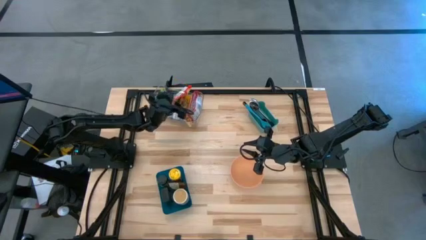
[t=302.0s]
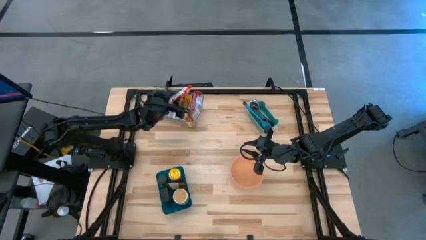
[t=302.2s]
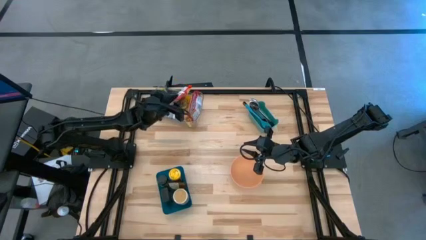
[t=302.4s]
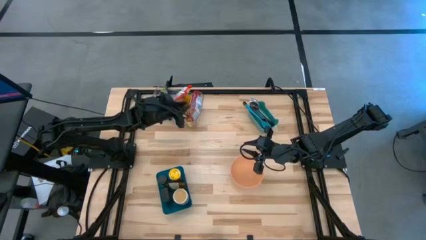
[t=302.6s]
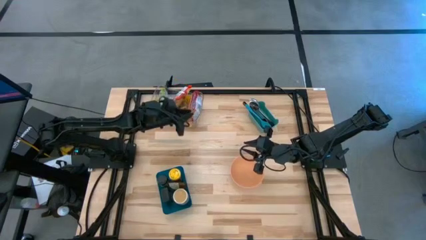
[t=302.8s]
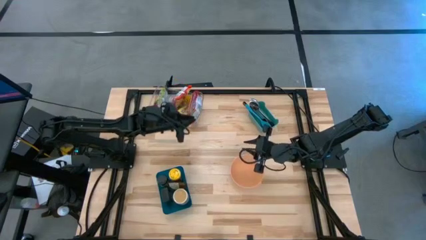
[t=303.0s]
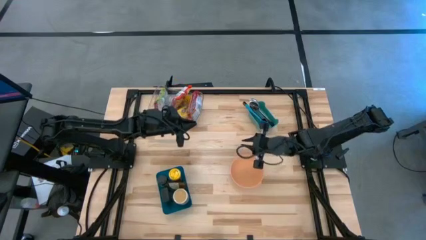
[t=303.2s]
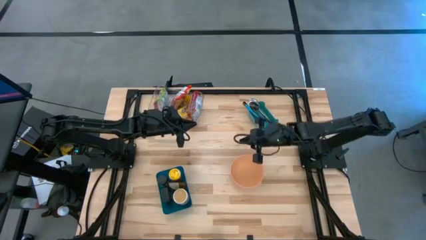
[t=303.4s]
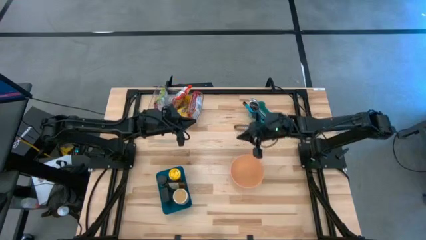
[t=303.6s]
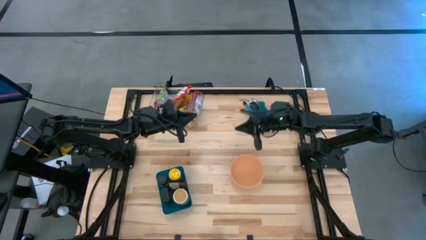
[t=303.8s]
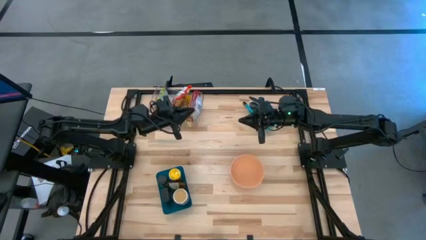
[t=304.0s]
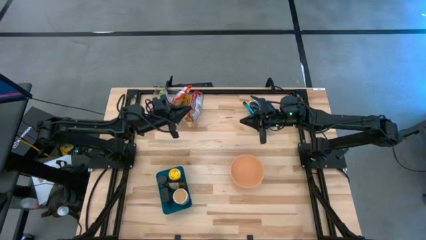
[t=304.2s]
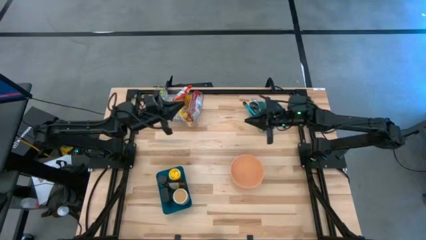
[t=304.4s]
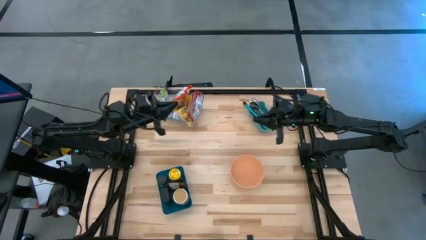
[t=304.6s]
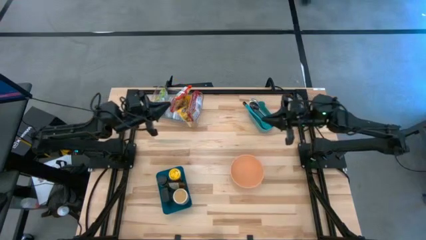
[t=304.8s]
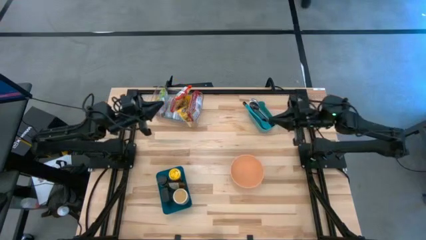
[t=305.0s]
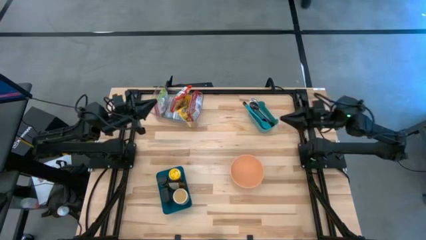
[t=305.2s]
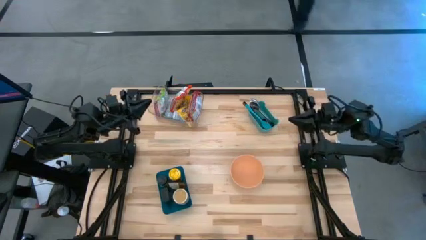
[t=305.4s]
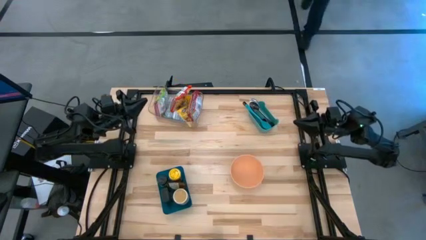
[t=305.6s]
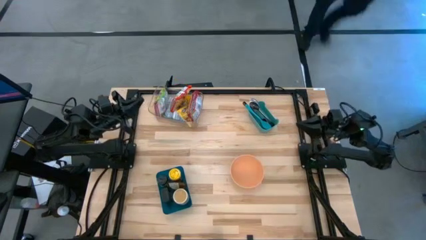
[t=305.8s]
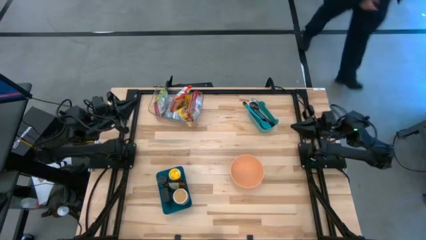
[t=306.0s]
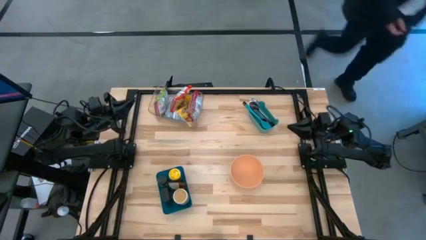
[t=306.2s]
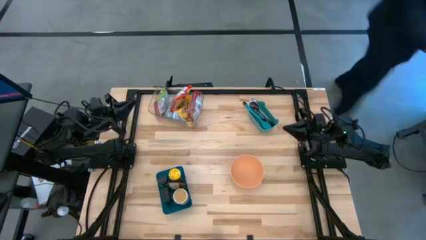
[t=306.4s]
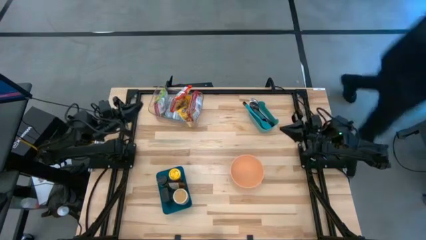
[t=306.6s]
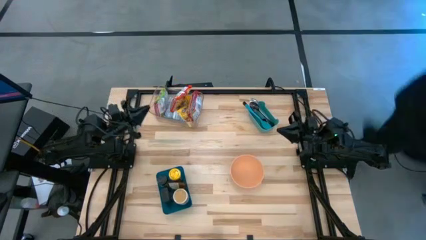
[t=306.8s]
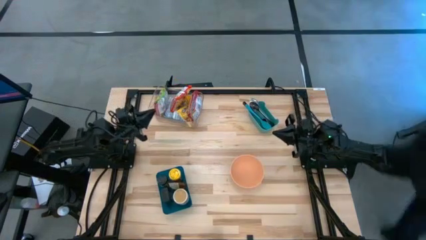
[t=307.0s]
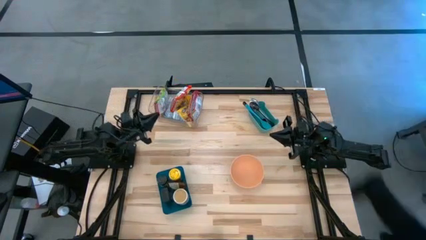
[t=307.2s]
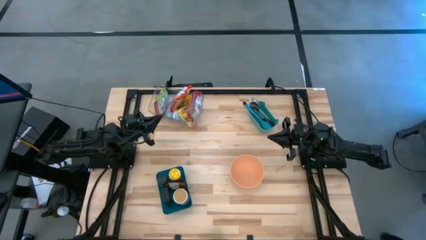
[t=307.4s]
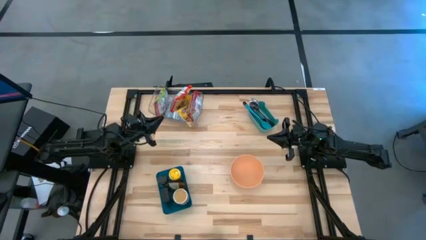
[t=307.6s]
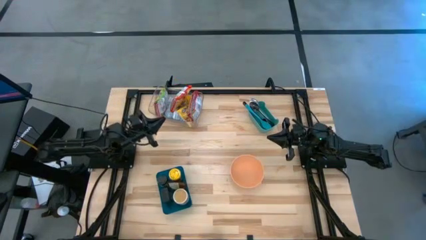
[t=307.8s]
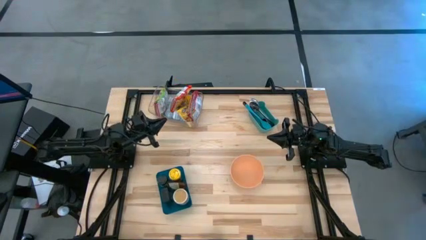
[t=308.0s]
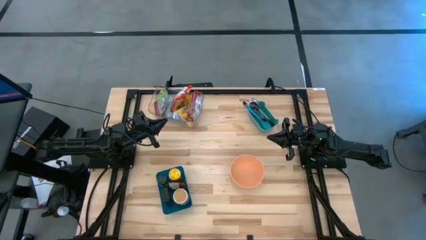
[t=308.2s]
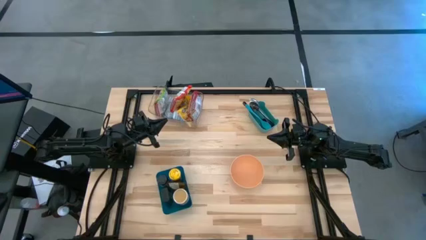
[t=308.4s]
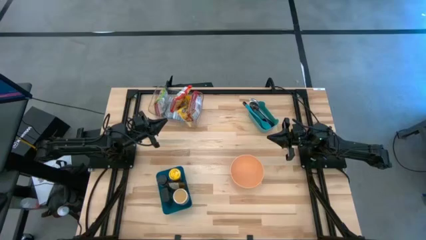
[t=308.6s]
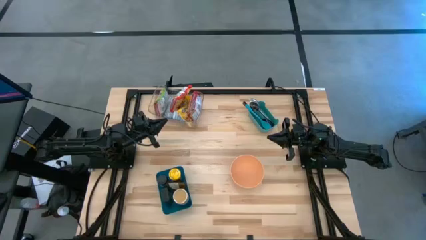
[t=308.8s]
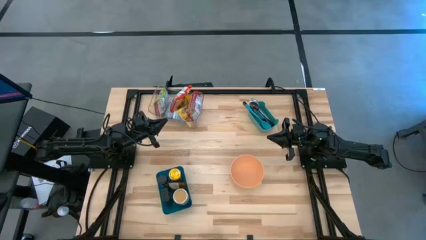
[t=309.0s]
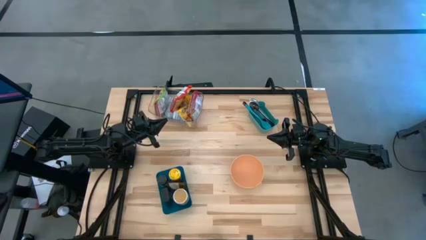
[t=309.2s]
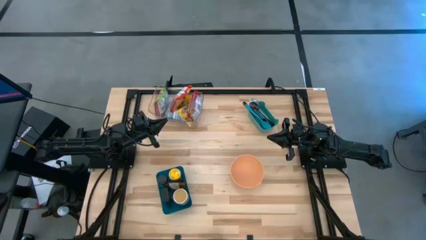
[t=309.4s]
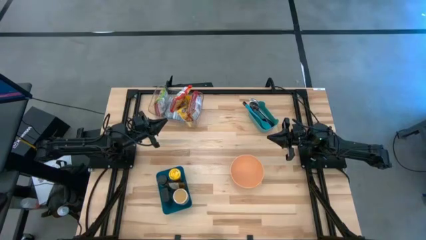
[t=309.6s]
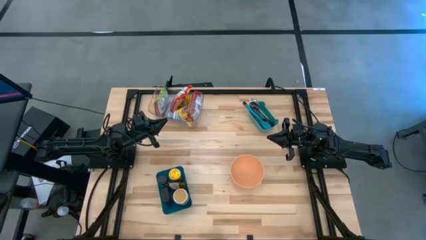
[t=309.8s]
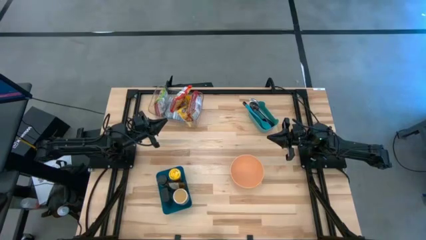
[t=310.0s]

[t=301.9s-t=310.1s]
Task: Pick & Place Food Item
Return to Home Position

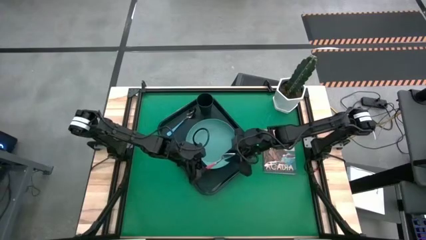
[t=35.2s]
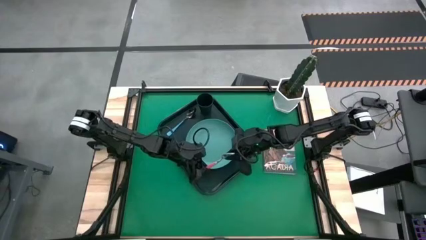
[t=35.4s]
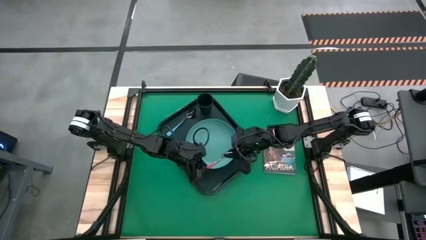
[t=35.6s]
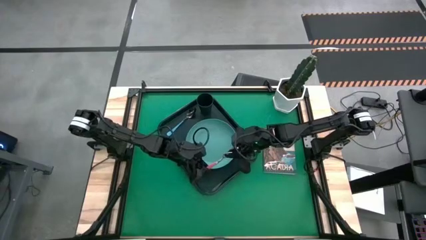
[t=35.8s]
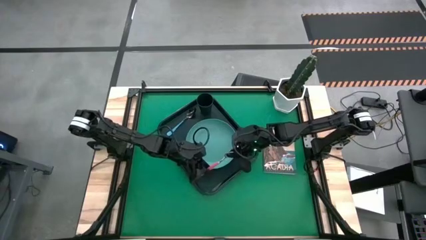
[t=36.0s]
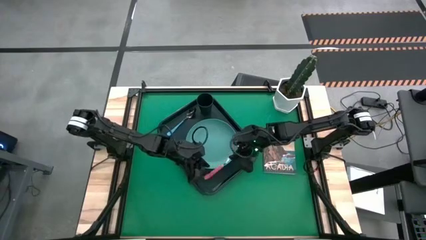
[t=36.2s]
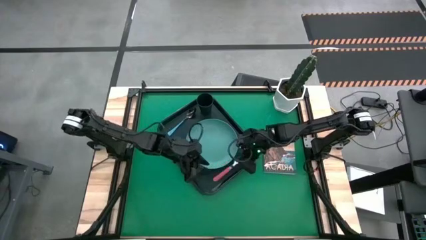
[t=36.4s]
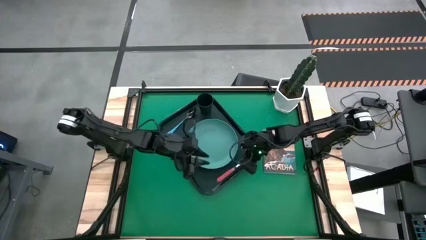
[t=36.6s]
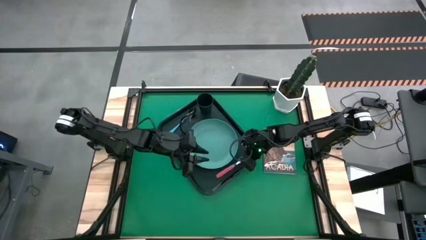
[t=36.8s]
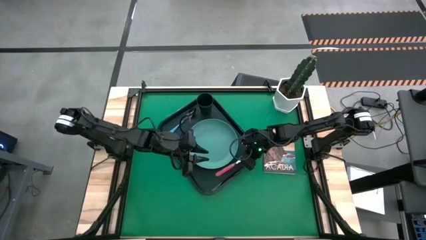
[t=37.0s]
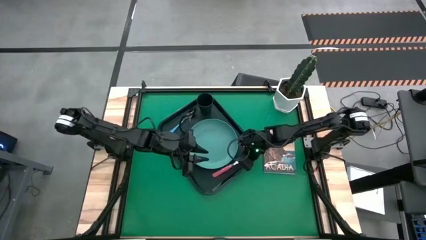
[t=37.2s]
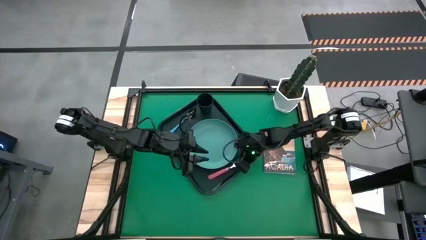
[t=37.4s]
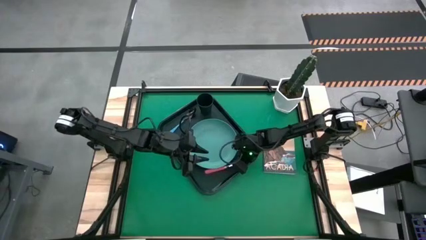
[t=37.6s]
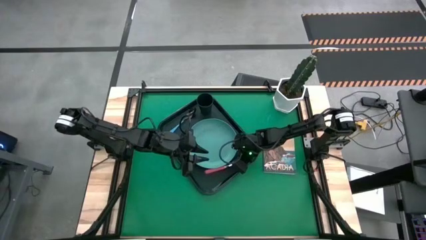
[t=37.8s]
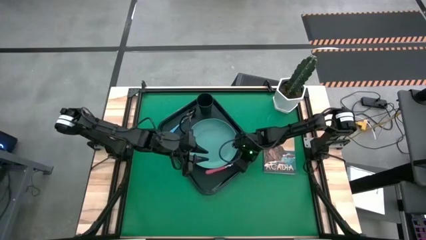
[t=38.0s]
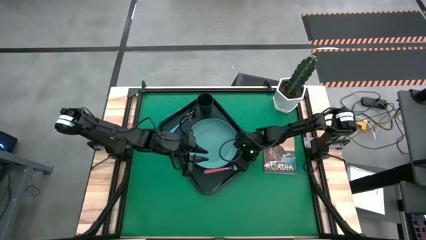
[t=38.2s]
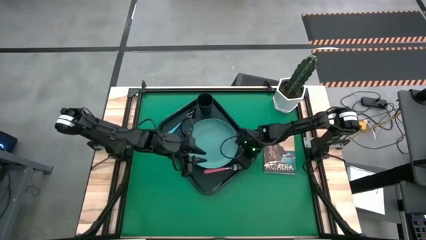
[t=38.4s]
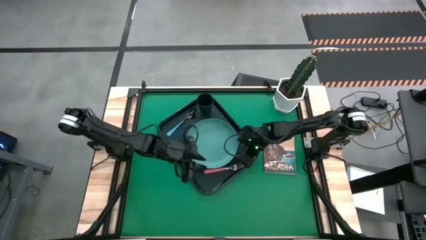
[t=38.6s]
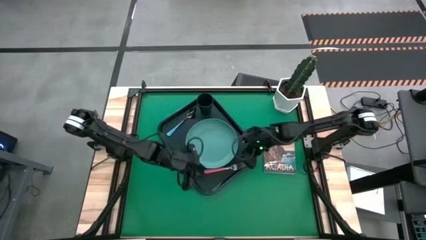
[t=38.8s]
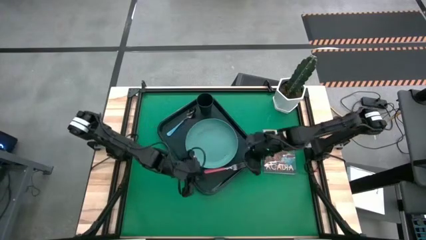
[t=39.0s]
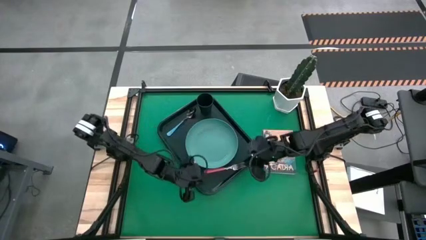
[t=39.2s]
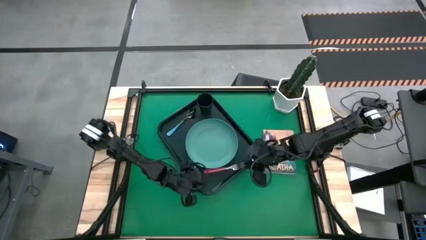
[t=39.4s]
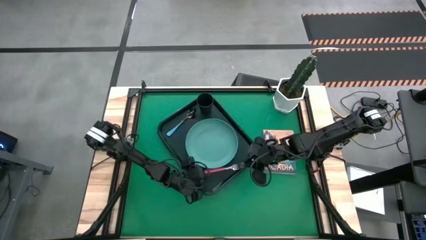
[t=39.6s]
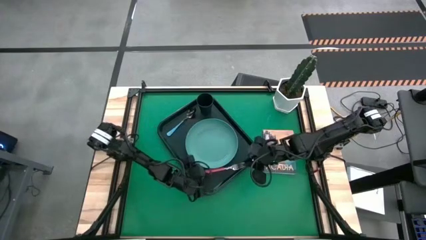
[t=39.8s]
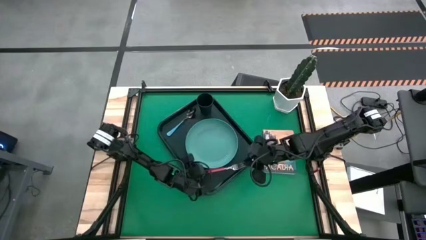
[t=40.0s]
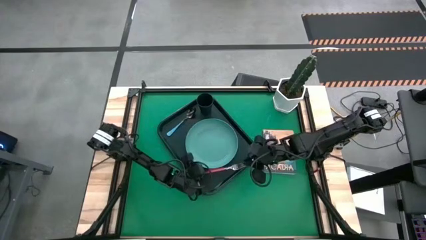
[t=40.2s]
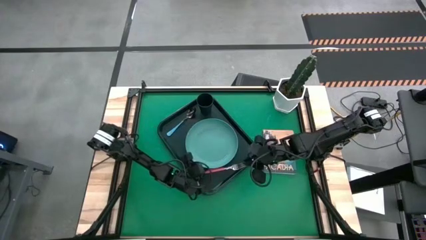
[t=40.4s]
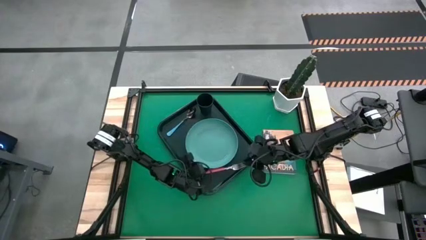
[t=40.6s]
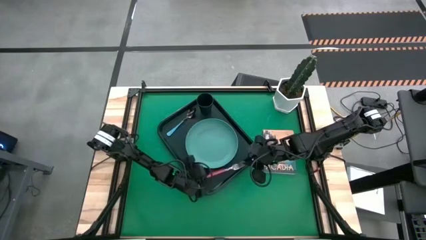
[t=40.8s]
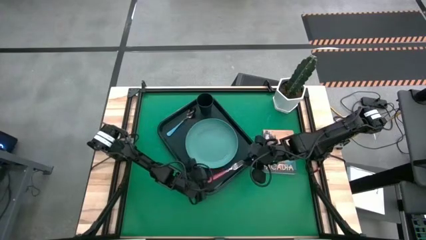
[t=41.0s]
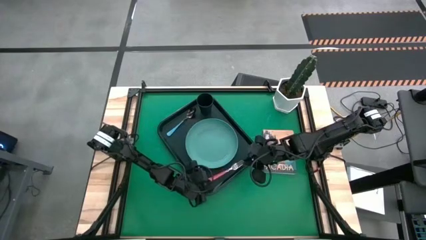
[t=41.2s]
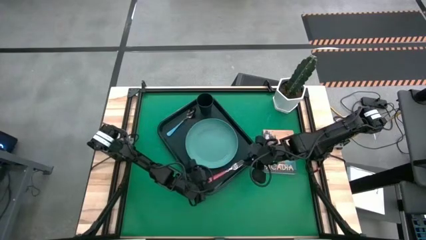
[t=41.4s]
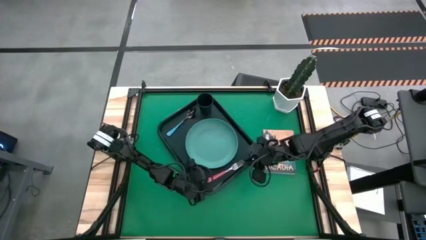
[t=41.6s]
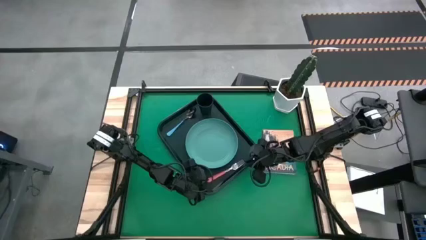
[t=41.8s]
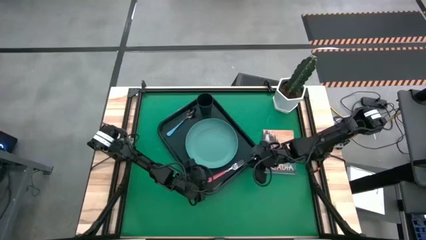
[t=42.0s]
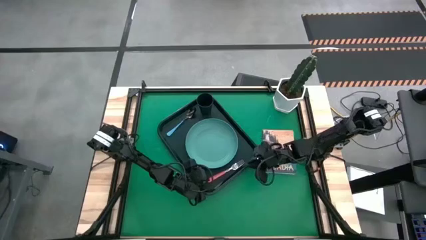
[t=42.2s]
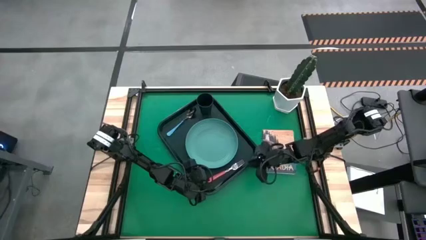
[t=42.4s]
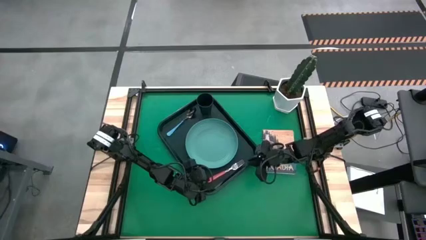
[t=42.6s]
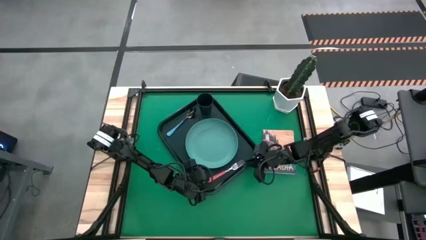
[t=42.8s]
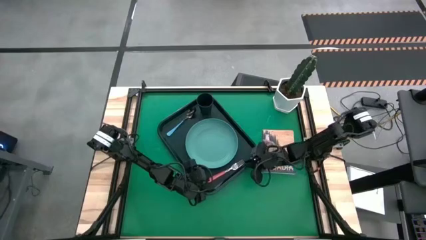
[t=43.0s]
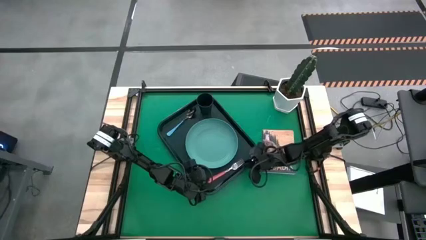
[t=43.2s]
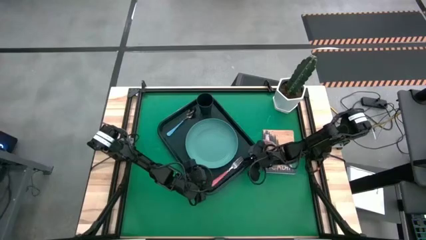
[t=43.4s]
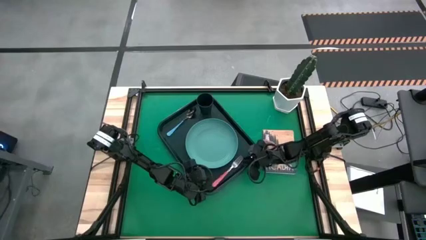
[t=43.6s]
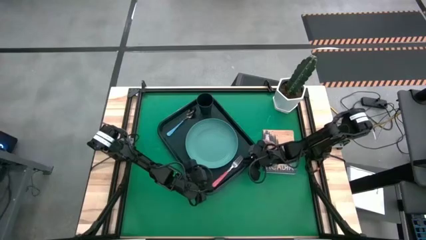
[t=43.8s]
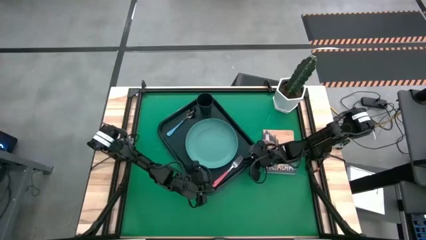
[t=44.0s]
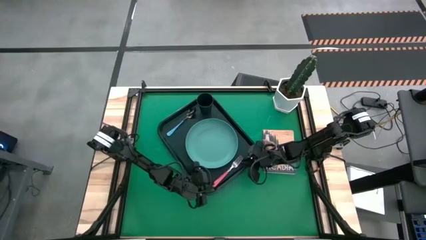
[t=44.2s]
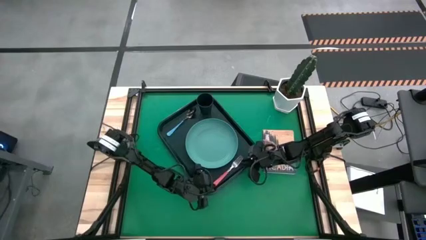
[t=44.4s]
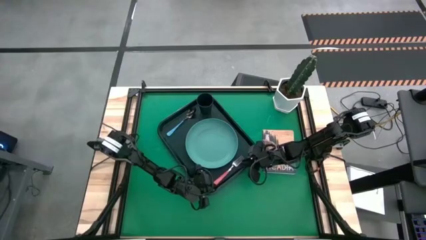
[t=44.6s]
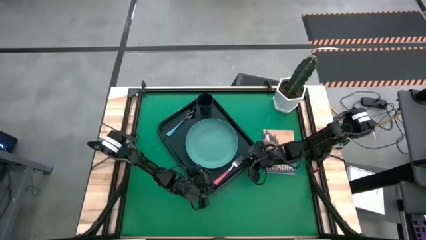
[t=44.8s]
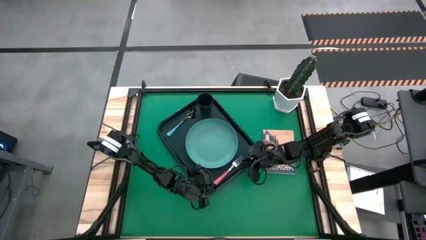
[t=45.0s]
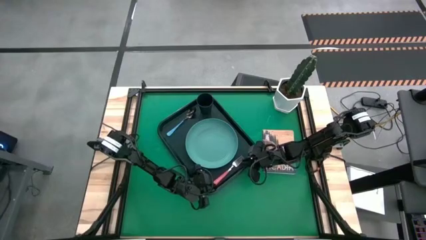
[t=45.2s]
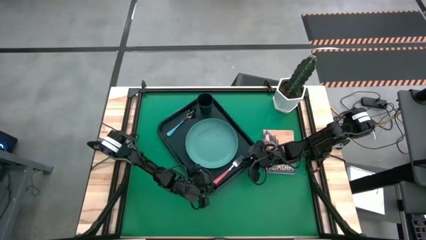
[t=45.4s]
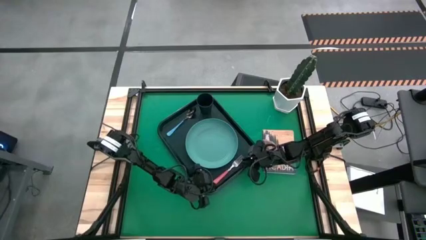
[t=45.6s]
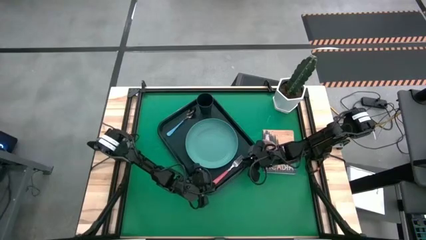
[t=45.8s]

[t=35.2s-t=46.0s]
Task: Pick and place plate/cup/fork/spoon on tray
Put the pink fork on the black serving tray to the right of the blue plate
